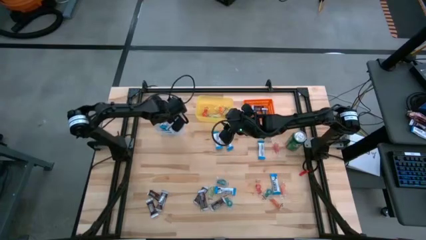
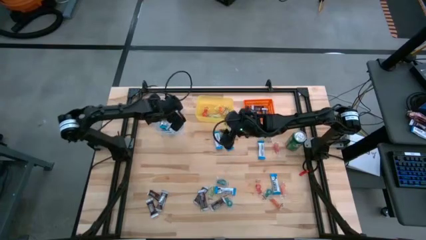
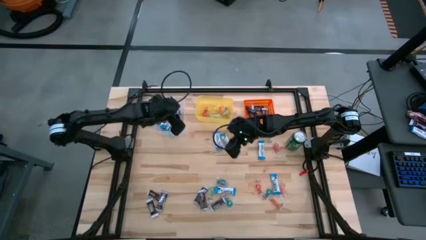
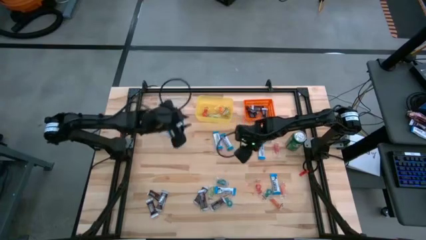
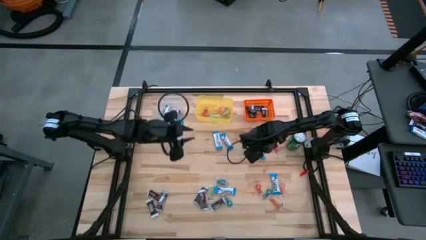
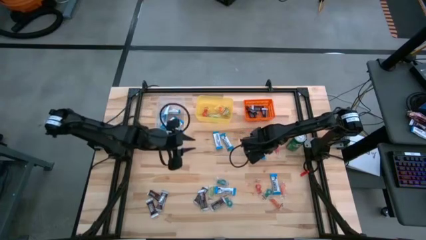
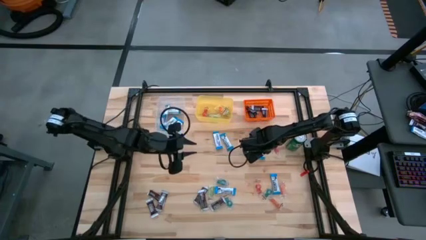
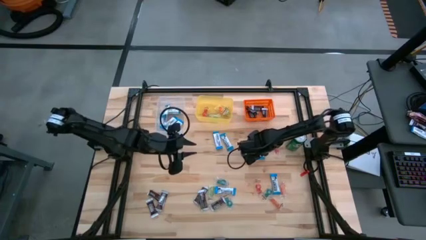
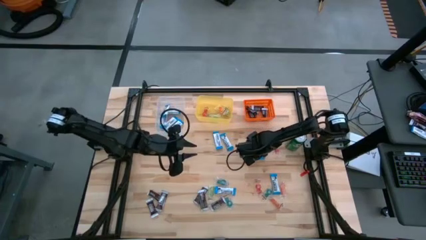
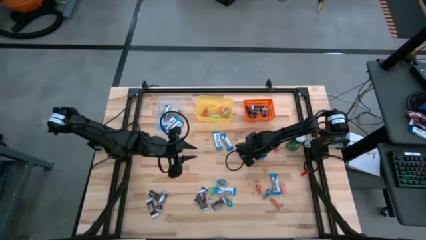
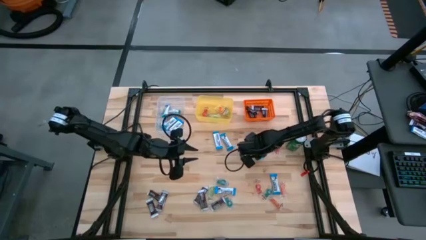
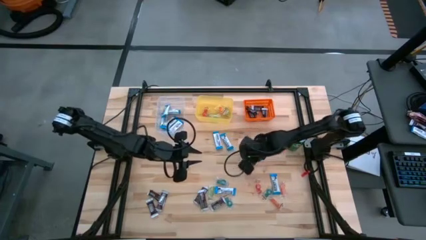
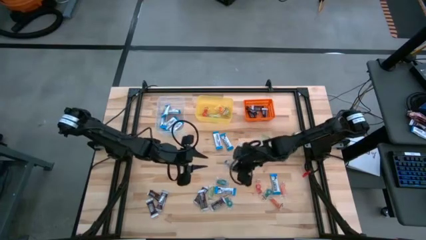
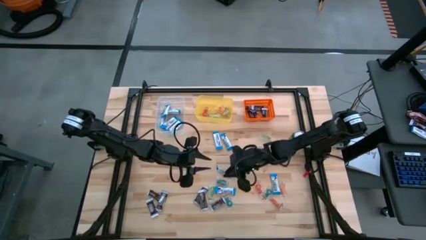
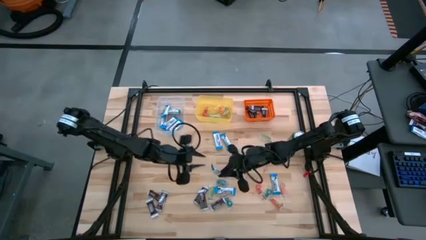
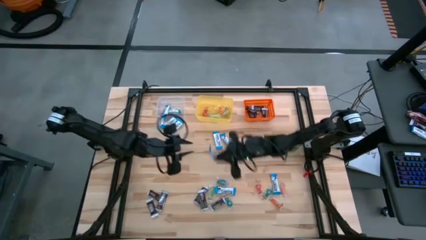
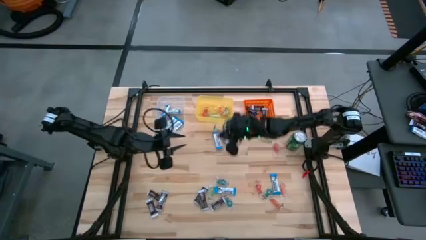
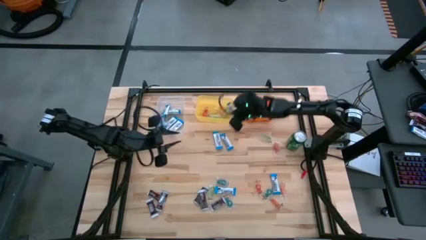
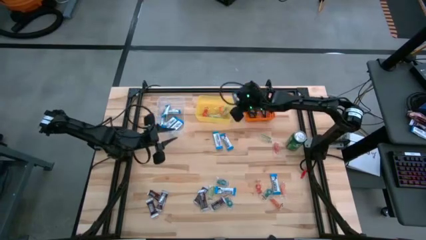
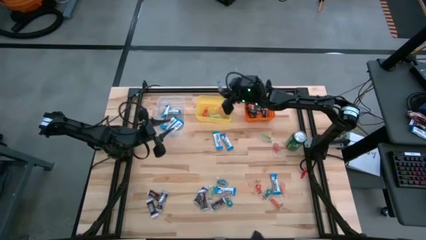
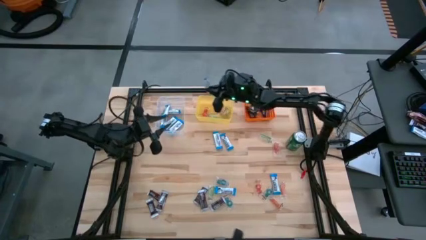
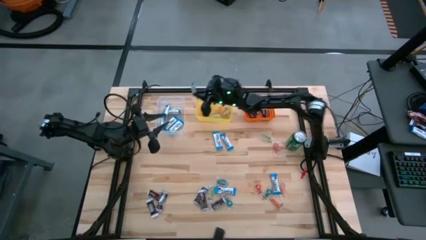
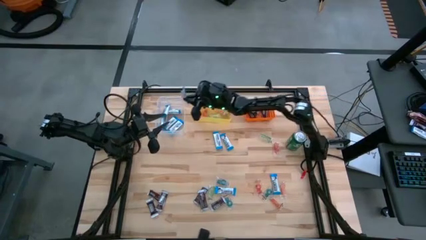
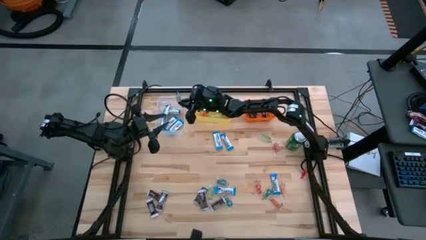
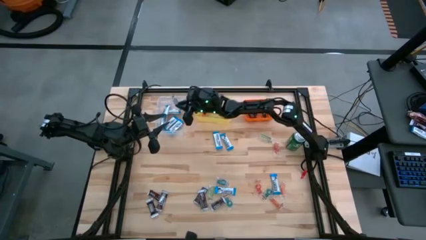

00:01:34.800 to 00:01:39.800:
Task: Sort candy
Put the white chocolate into the transparent bin

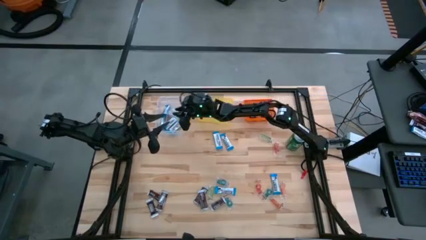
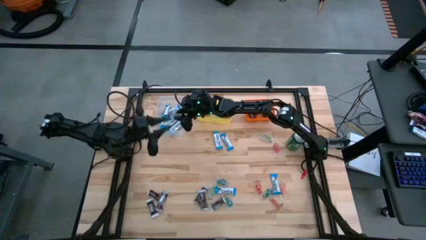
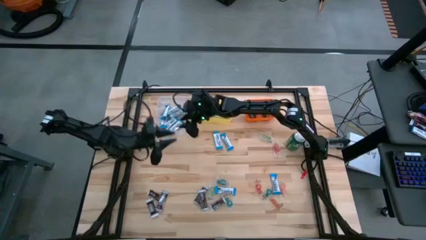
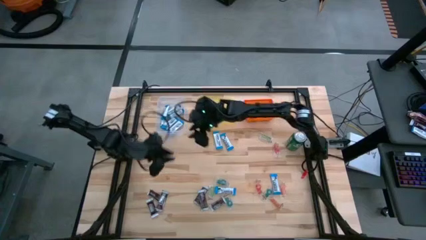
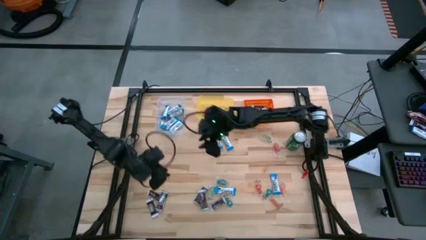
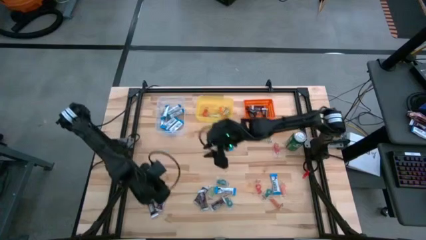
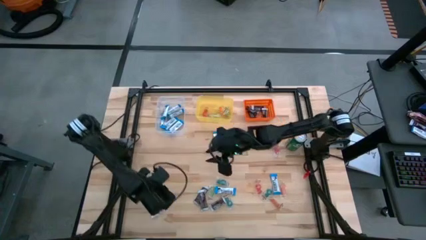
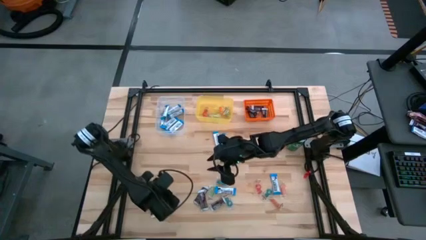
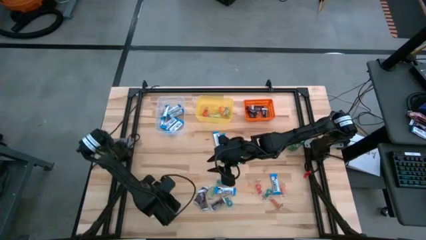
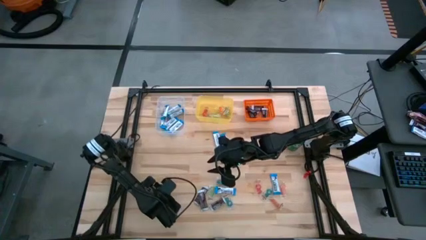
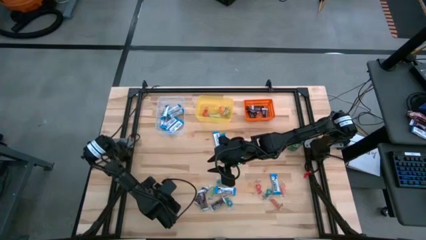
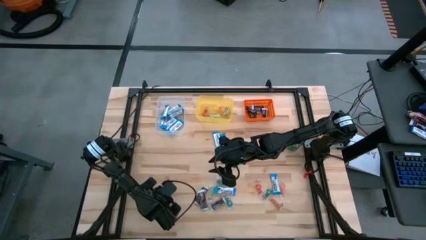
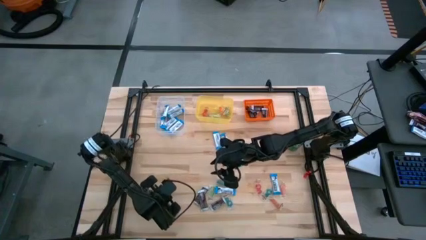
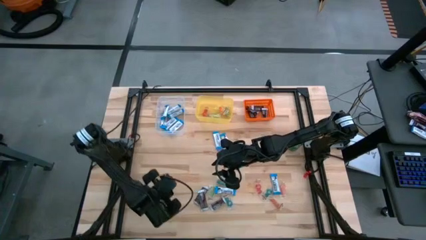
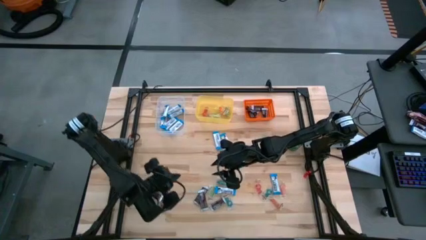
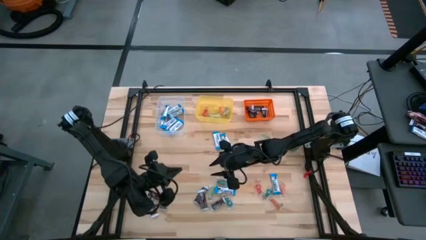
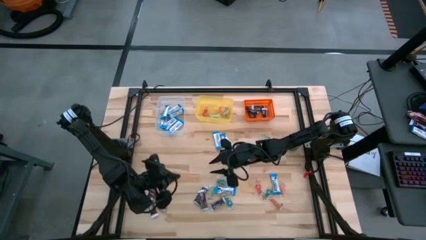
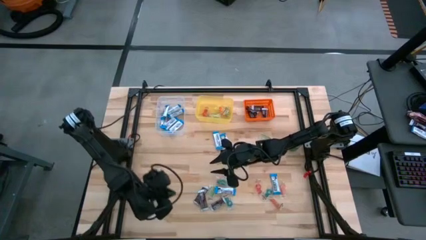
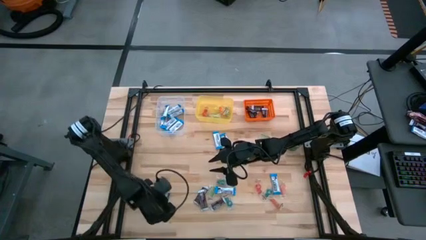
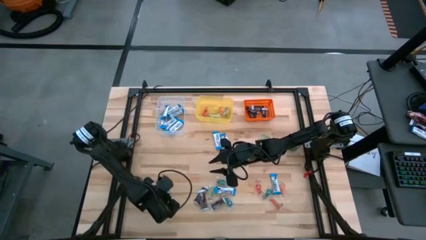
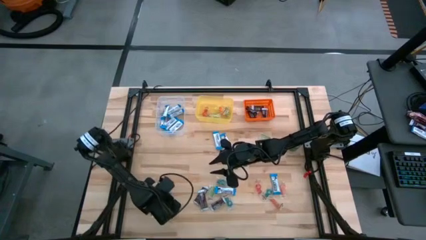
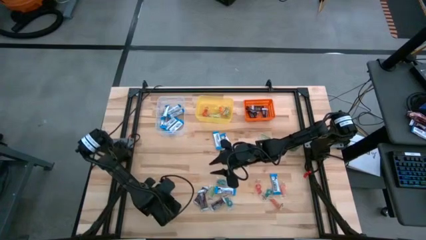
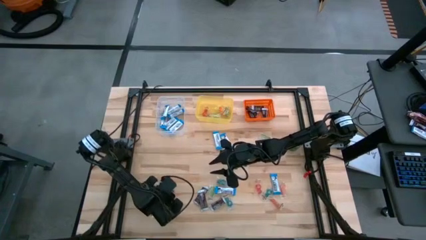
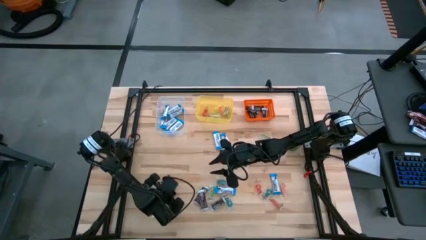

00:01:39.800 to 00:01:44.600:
Put the black chocolate into the orange bin

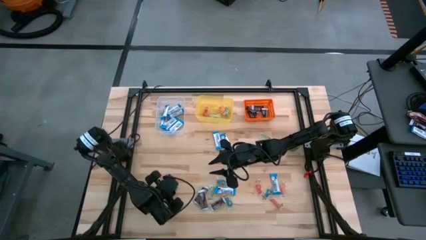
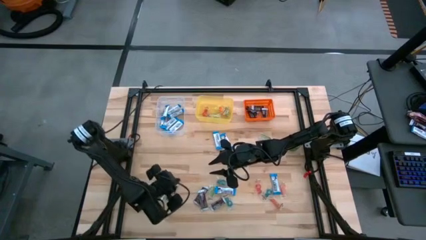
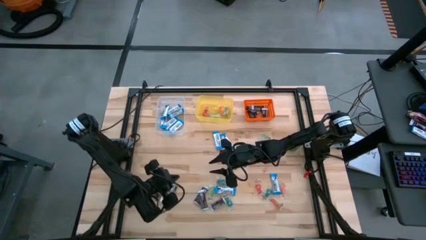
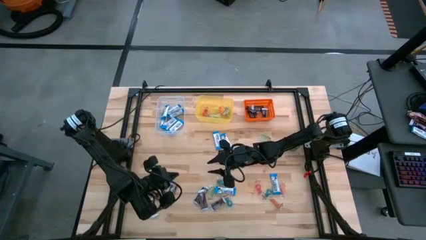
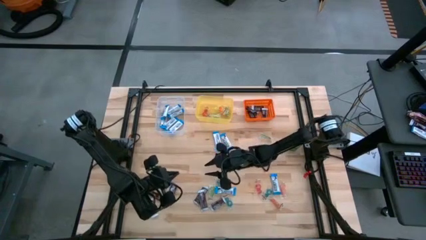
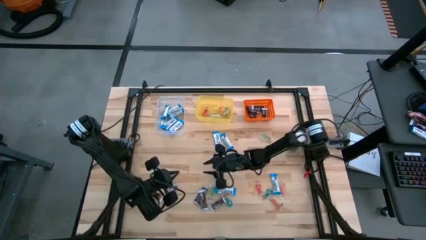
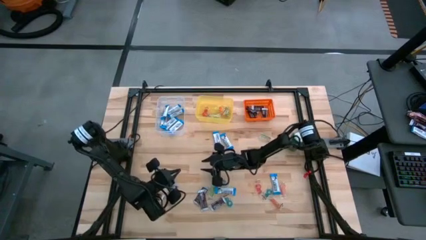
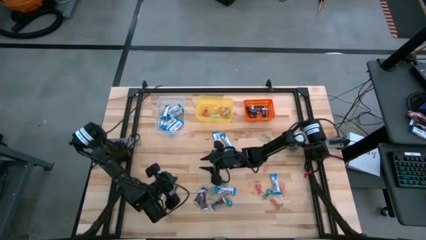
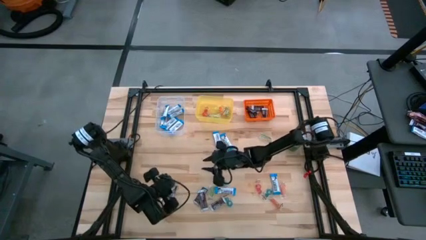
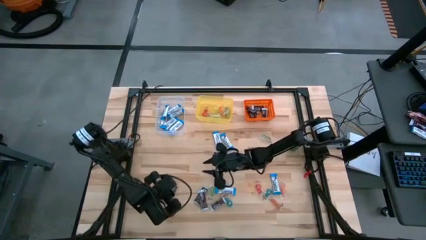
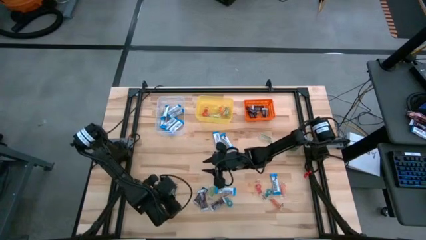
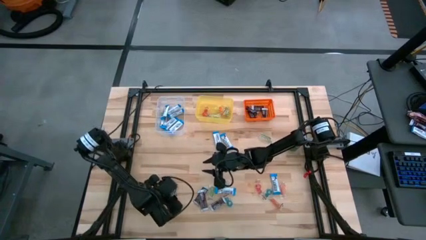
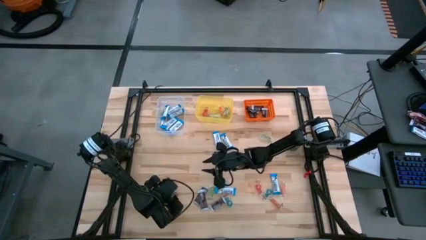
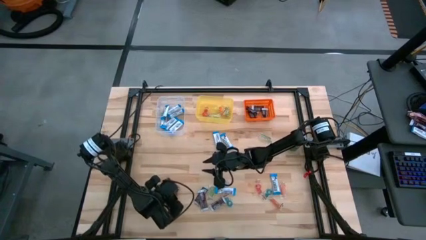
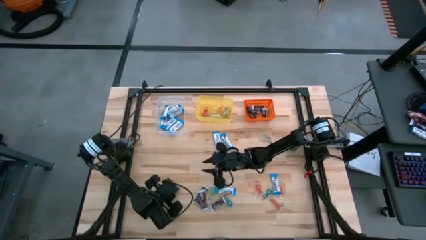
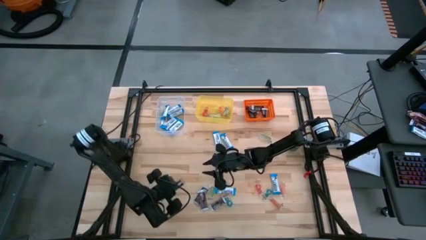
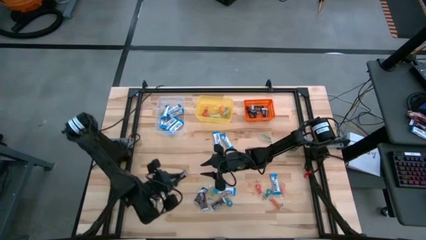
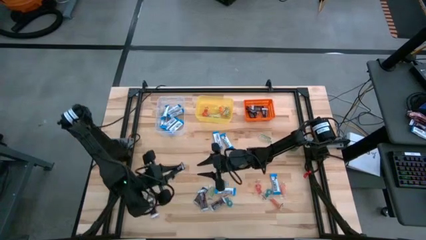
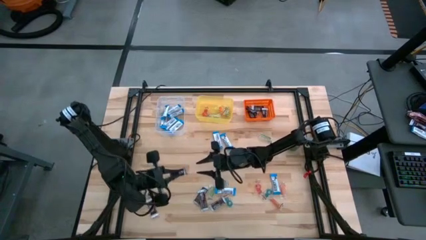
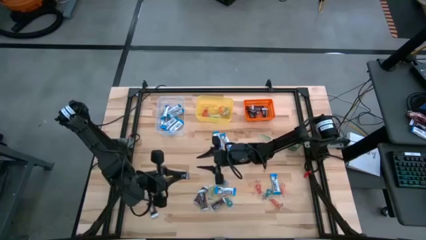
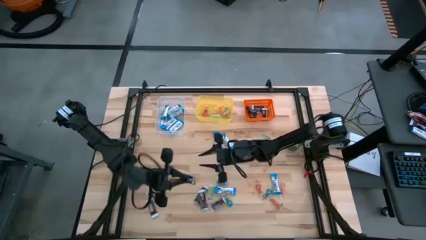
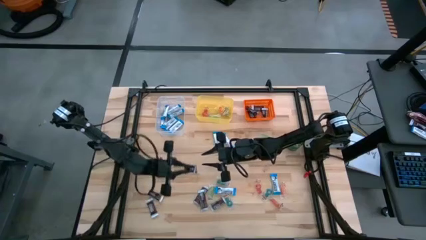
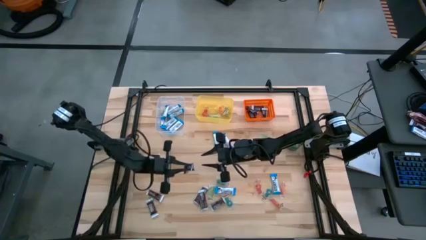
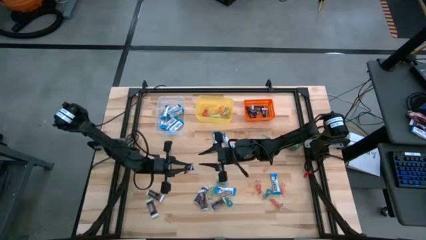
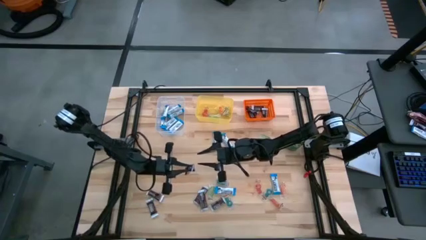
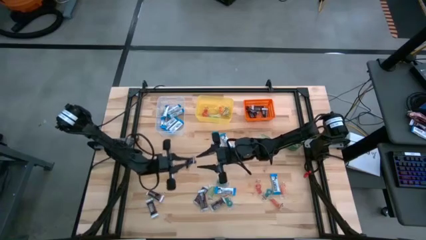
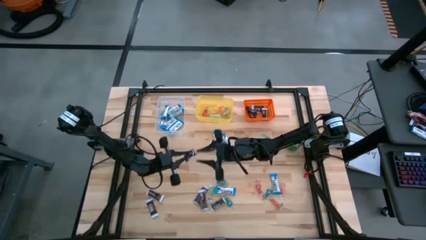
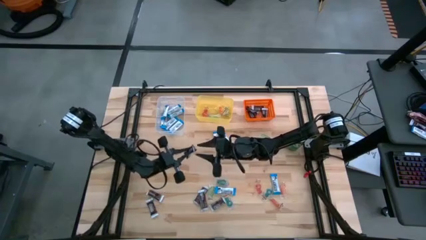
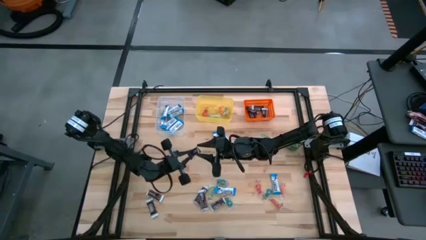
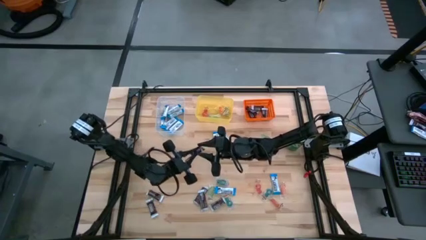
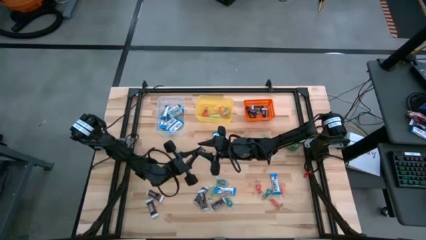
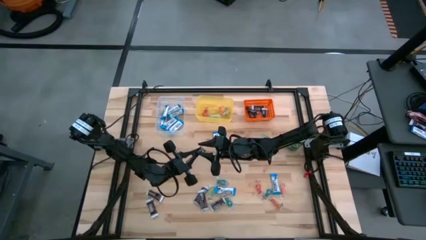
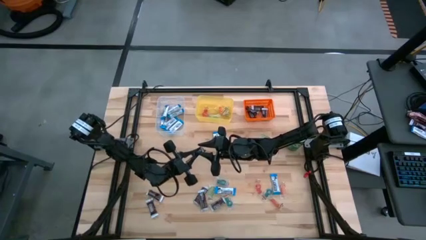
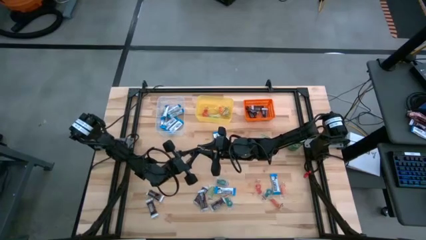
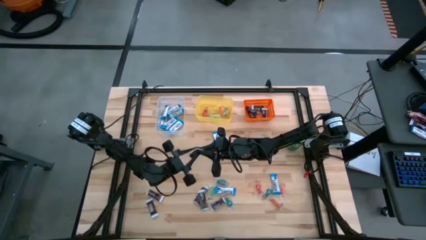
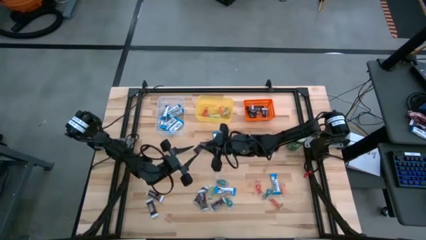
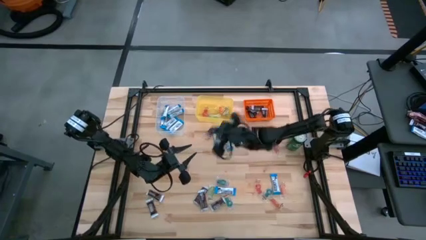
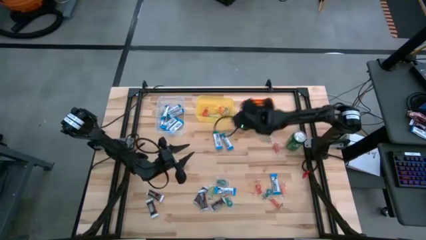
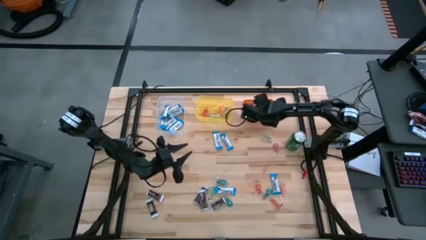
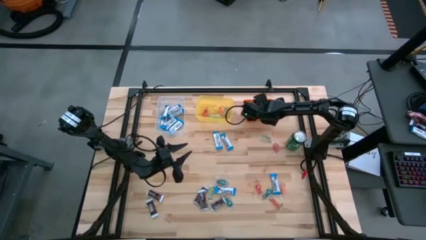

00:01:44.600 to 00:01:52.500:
Put the black chocolate into the orange bin
